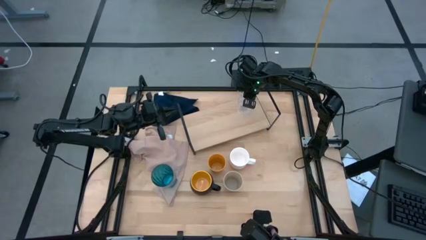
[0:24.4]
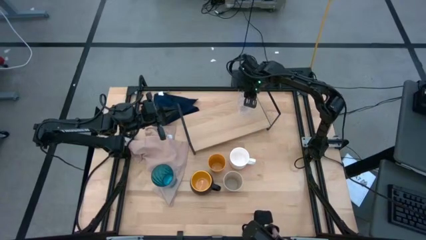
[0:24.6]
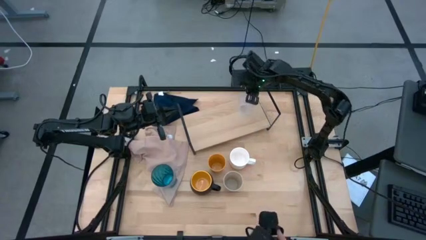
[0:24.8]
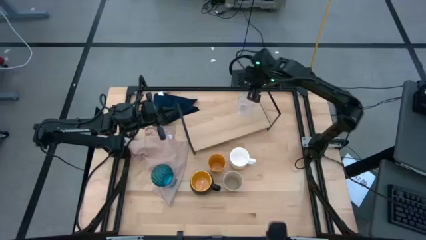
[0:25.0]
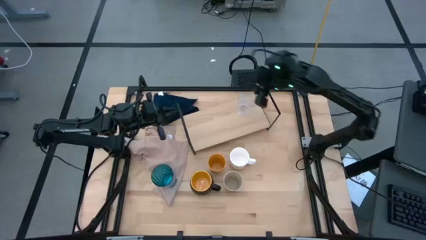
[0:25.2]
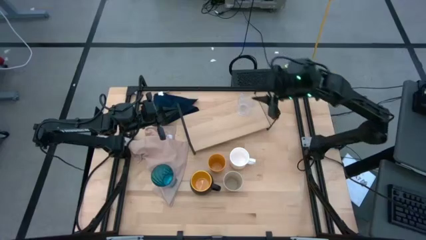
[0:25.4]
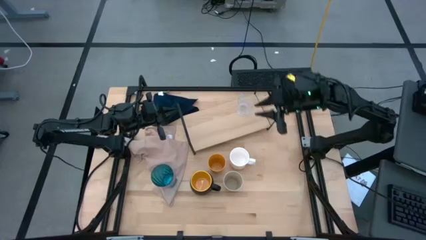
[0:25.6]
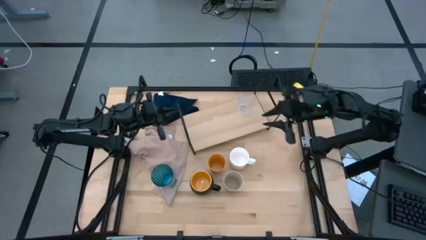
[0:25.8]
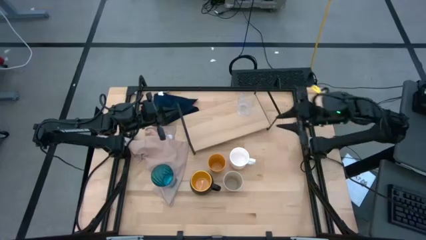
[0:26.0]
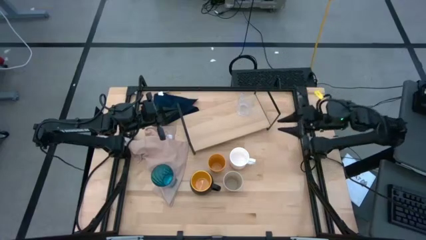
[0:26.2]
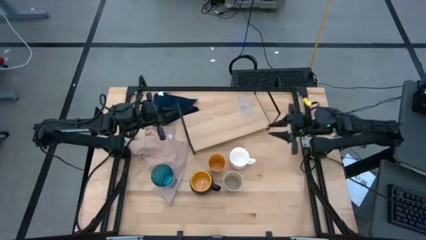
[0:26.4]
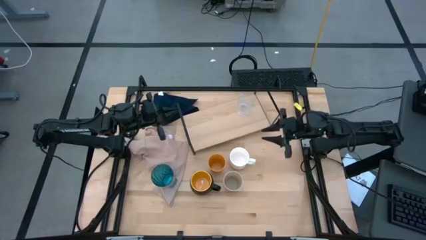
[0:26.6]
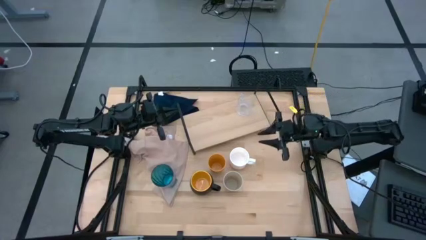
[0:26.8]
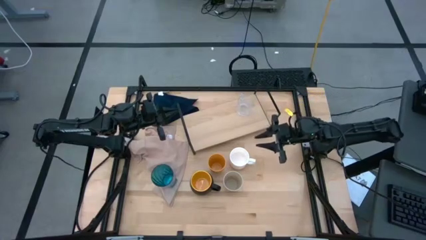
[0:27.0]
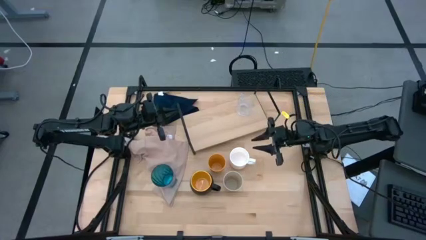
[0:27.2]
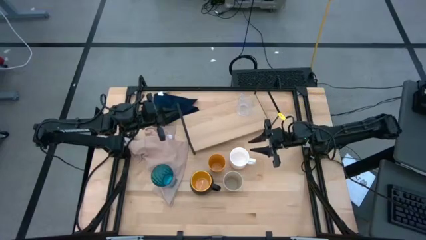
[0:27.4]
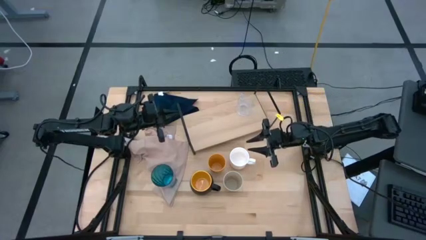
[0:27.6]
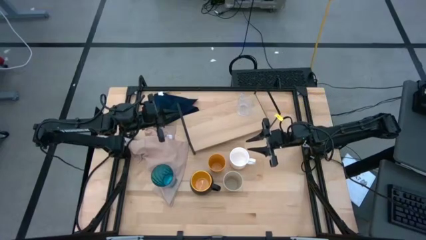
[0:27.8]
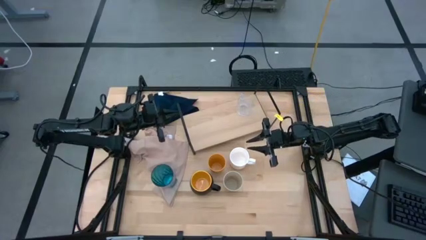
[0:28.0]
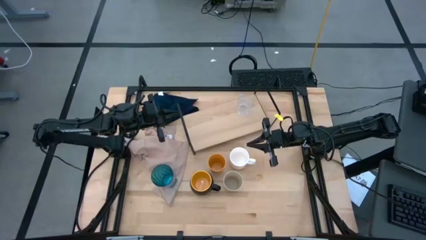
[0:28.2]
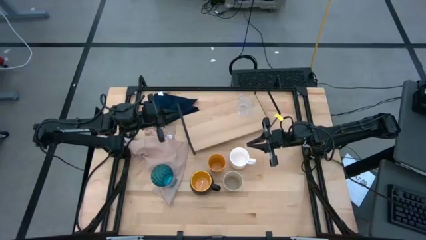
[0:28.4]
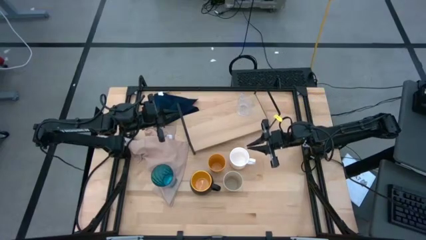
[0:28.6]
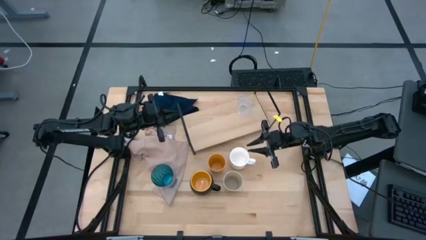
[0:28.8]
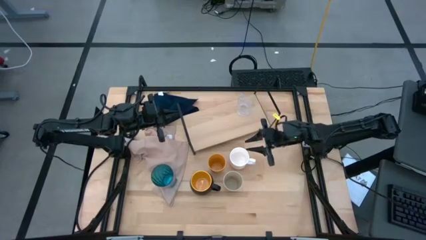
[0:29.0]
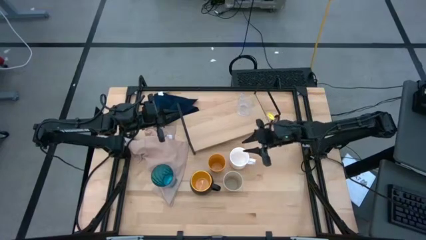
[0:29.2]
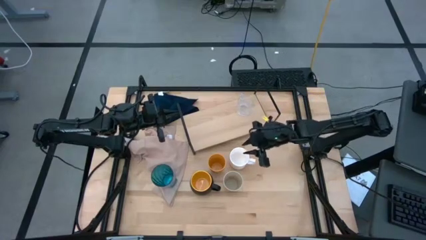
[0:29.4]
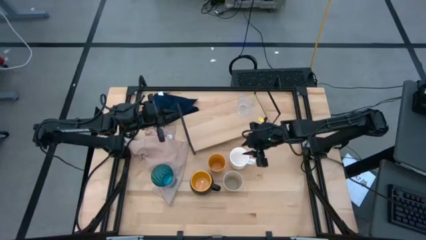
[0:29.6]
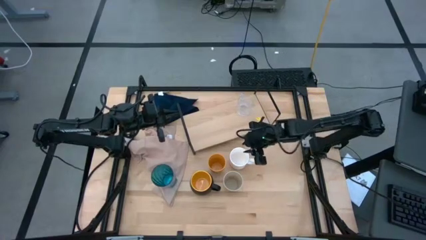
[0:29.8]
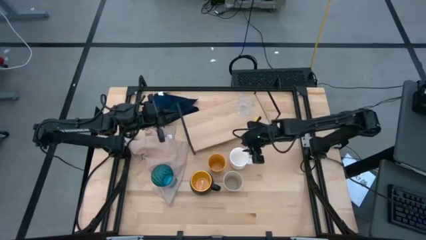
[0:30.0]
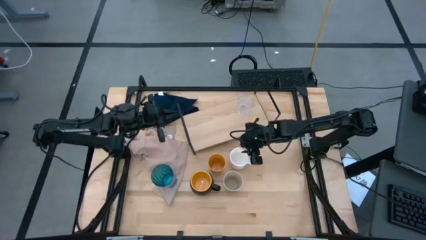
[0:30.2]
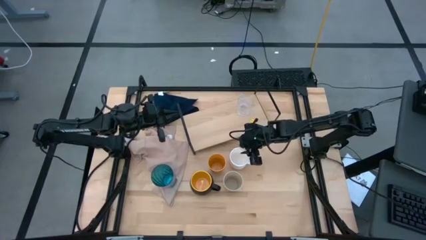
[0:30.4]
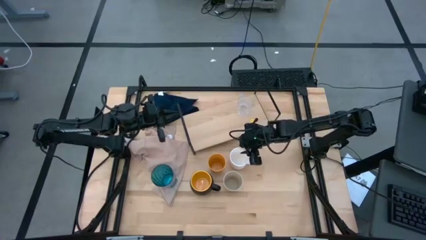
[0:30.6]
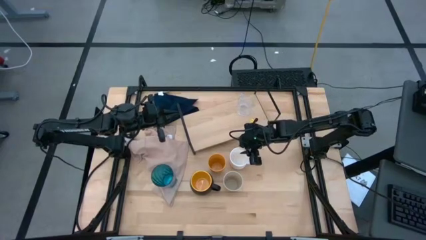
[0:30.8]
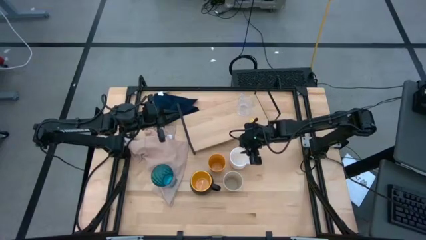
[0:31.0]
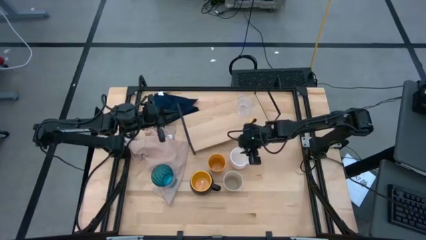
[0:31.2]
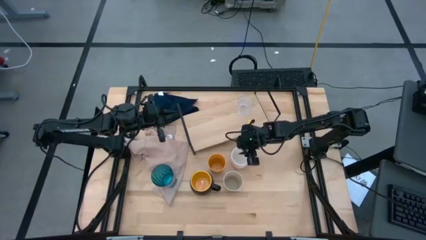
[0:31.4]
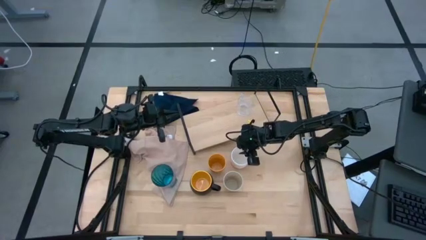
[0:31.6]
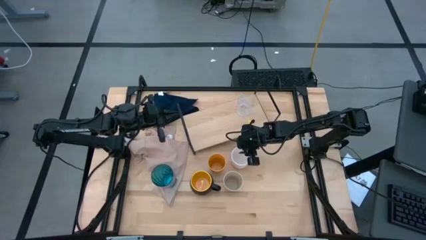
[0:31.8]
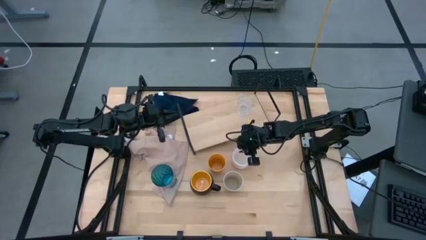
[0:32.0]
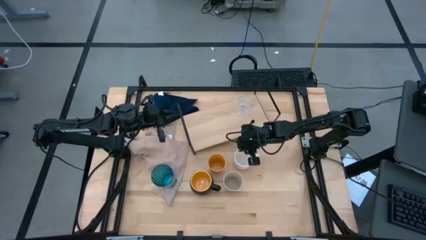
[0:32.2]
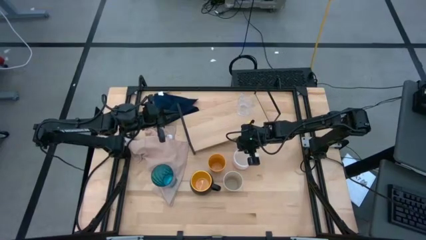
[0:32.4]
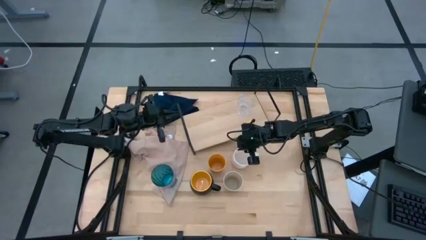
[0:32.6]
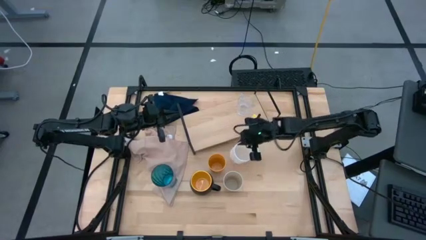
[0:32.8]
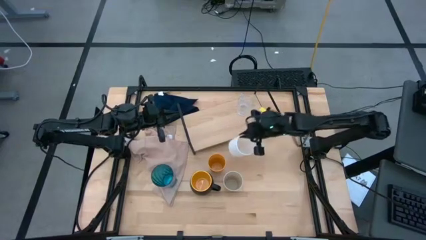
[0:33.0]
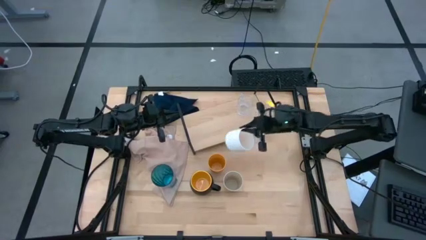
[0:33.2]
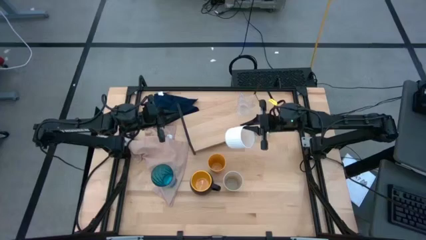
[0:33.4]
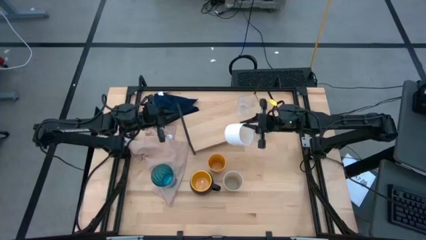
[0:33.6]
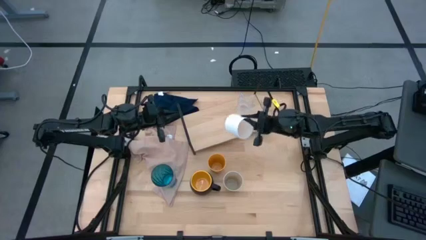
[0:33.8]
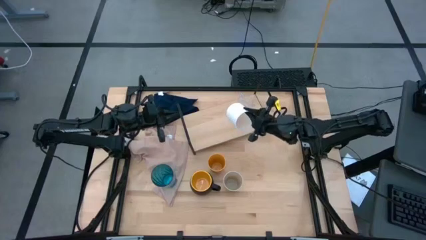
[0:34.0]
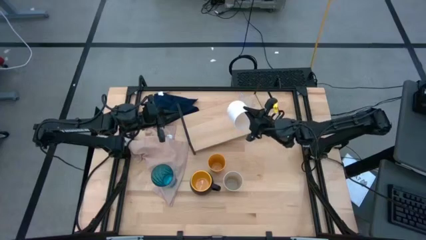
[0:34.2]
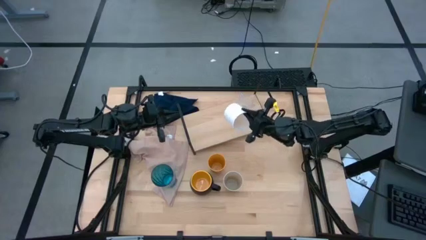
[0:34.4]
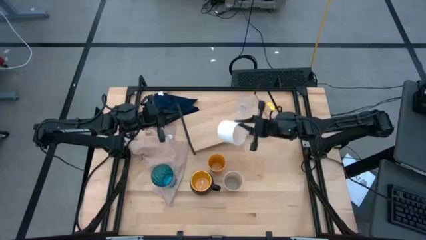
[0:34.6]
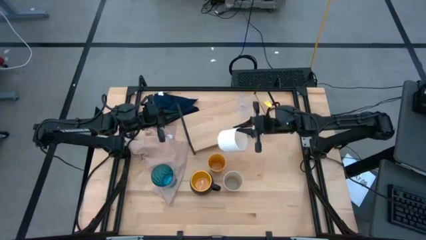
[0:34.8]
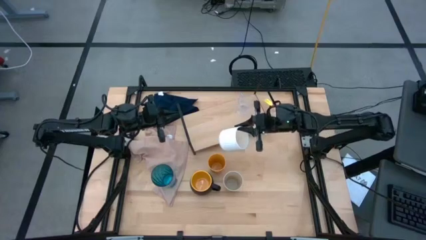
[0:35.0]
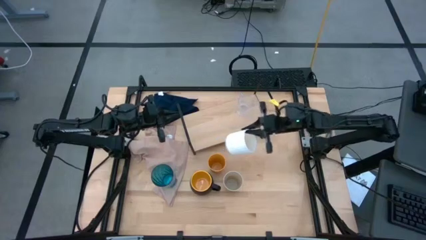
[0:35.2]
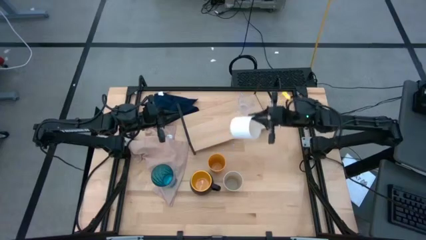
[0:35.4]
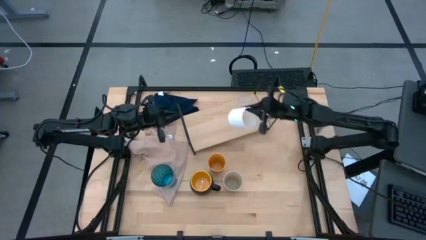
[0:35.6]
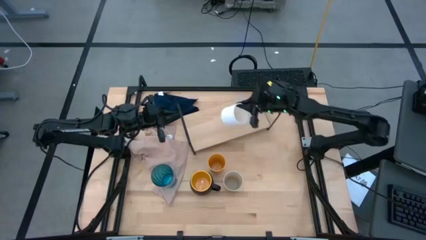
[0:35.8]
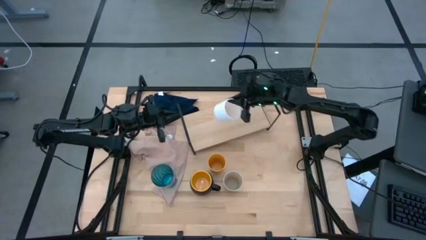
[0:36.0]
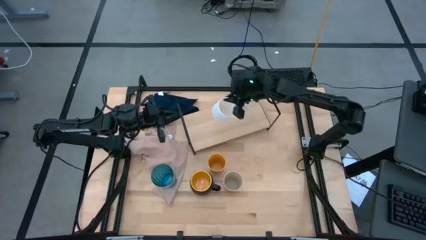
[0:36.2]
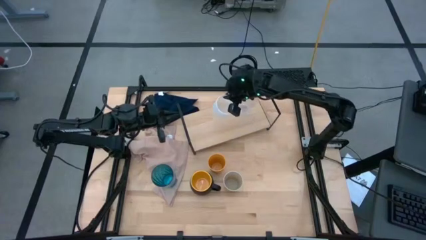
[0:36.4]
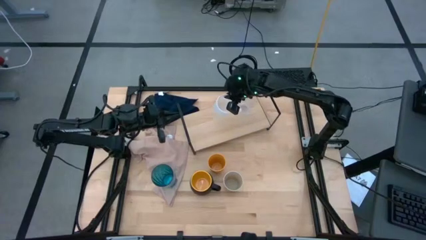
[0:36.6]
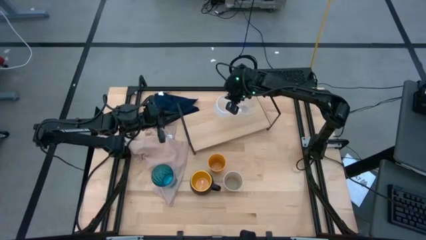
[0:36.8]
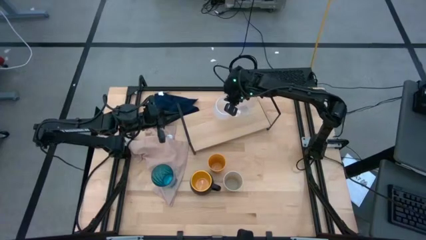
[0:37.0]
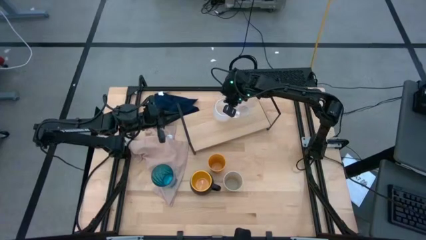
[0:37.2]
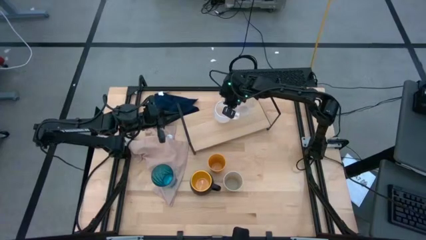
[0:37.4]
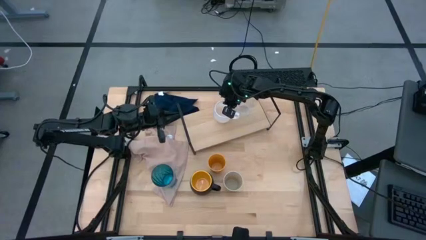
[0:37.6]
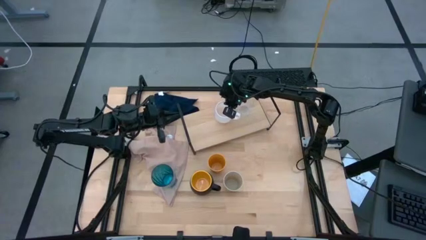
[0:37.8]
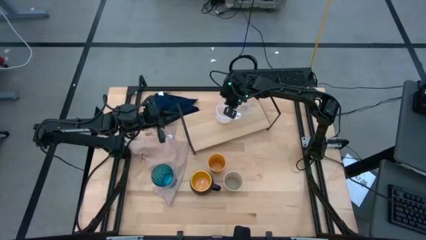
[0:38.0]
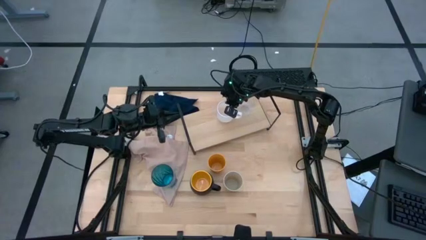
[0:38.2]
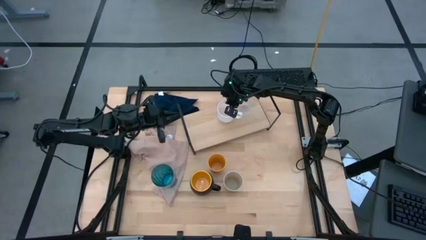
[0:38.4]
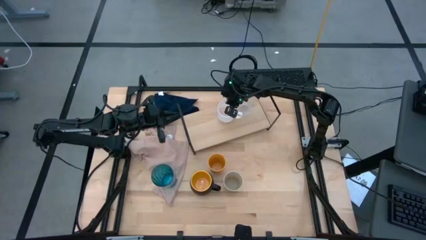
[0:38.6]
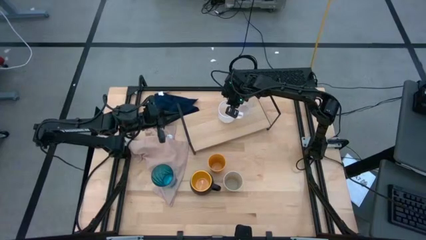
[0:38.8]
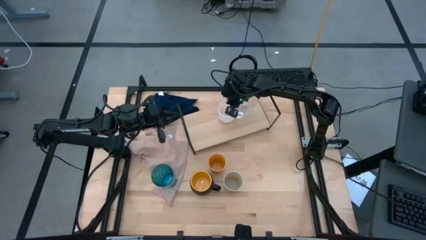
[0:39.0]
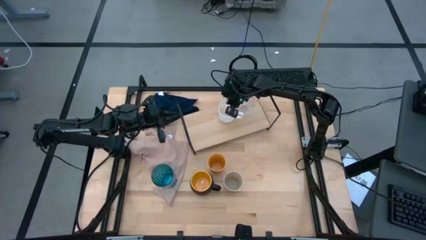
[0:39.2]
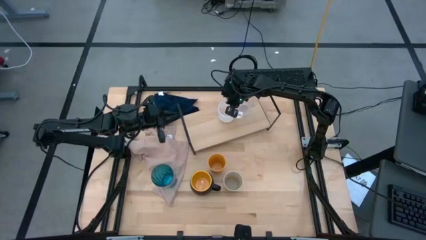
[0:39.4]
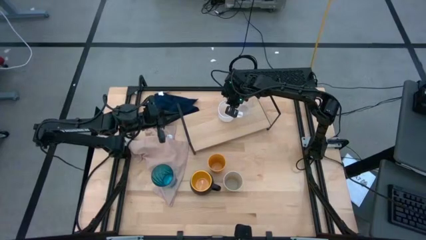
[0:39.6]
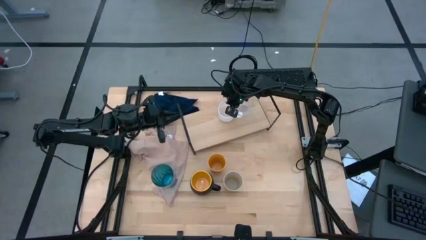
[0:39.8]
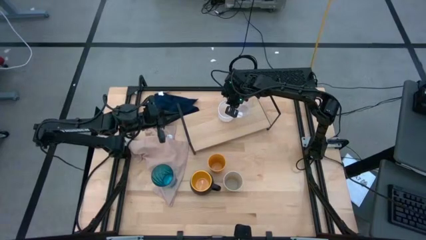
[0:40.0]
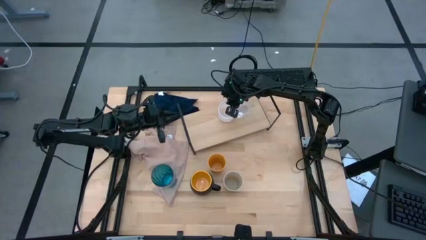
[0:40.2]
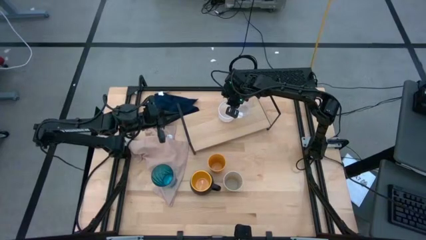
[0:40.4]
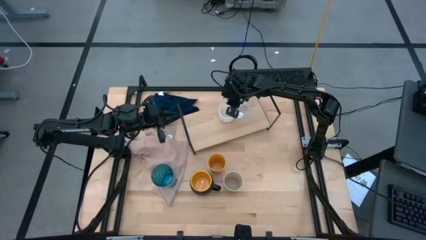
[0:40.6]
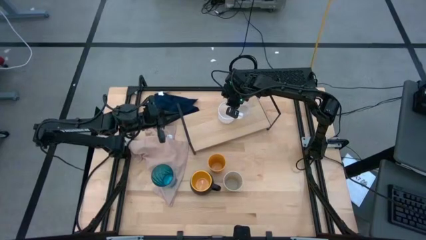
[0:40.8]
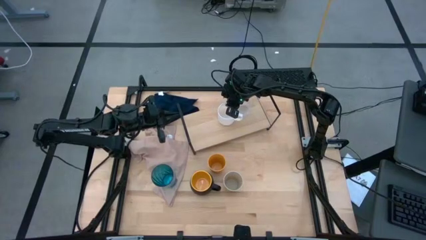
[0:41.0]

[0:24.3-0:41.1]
Task: Stack small to large cups/mugs on shelf
Put the white cup on the shelf
